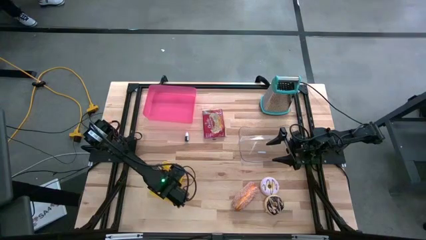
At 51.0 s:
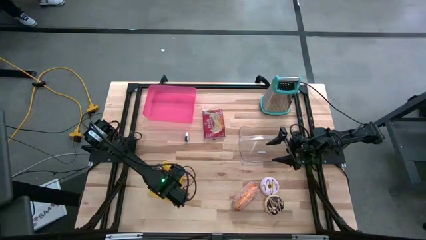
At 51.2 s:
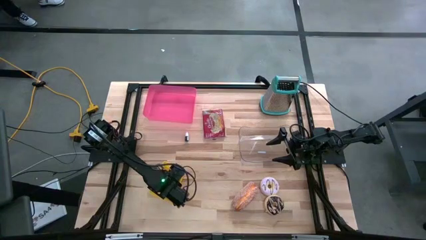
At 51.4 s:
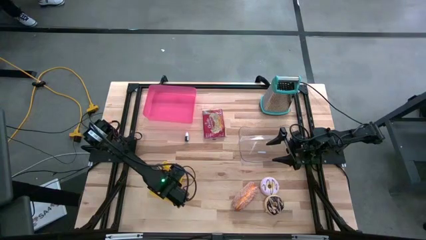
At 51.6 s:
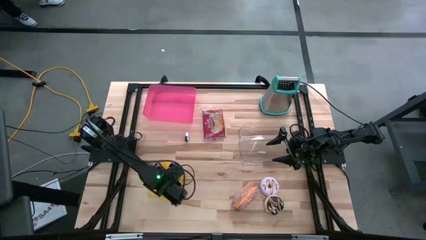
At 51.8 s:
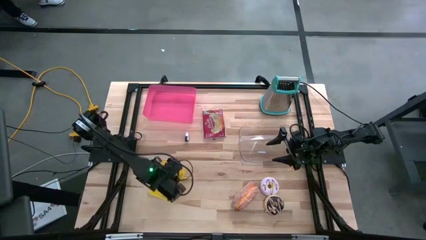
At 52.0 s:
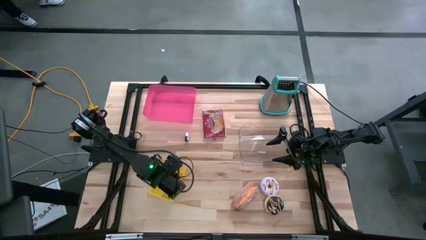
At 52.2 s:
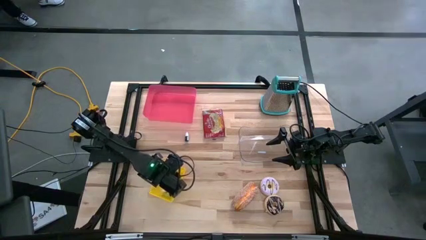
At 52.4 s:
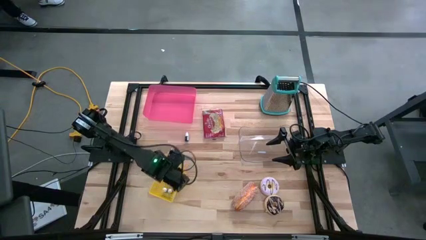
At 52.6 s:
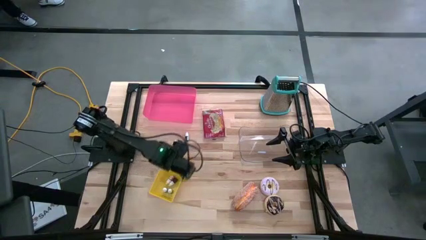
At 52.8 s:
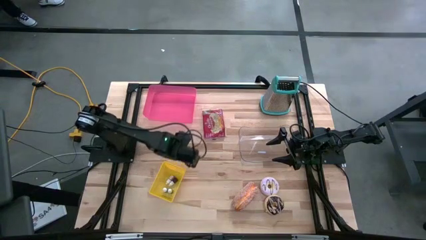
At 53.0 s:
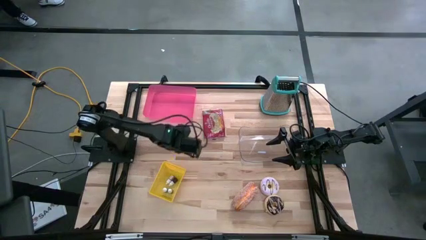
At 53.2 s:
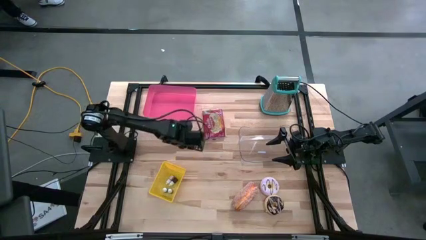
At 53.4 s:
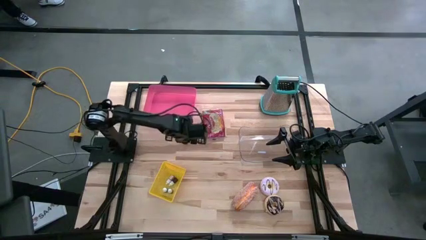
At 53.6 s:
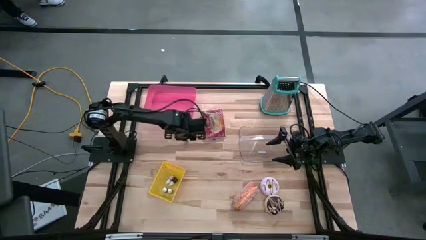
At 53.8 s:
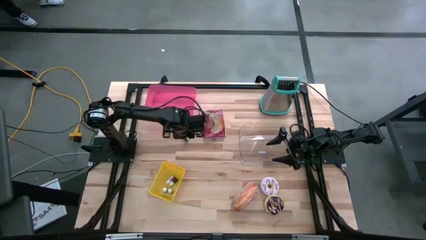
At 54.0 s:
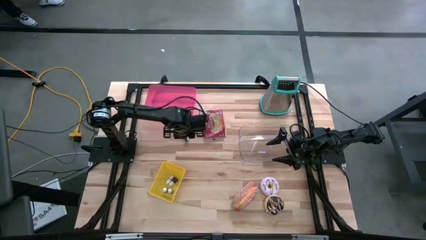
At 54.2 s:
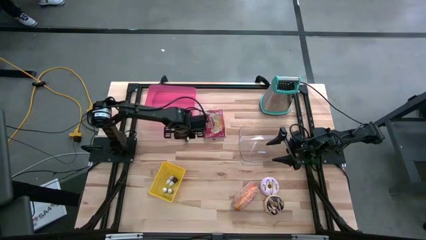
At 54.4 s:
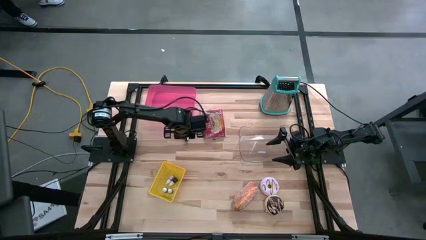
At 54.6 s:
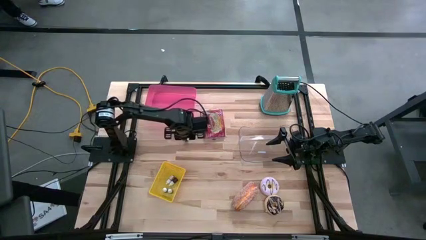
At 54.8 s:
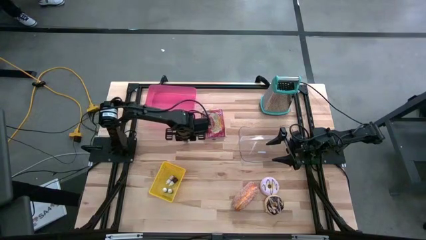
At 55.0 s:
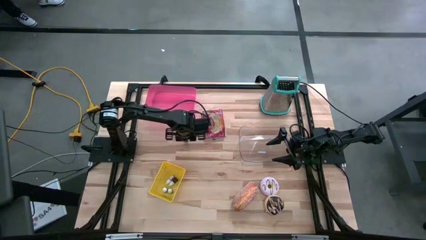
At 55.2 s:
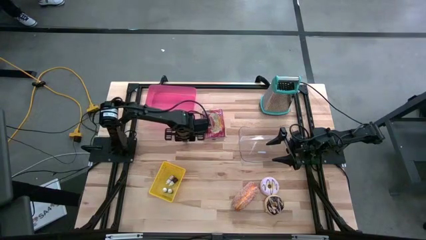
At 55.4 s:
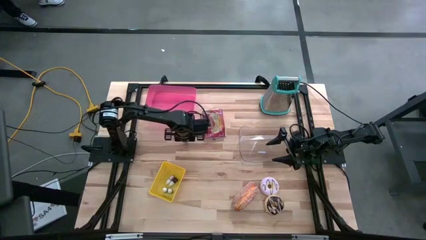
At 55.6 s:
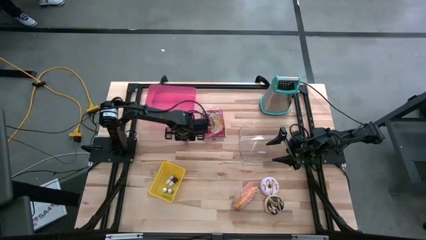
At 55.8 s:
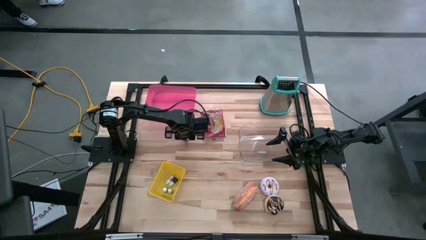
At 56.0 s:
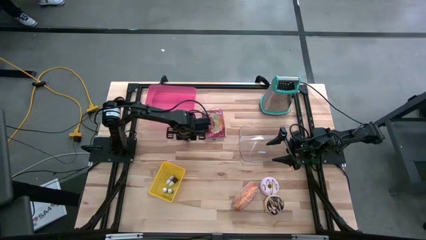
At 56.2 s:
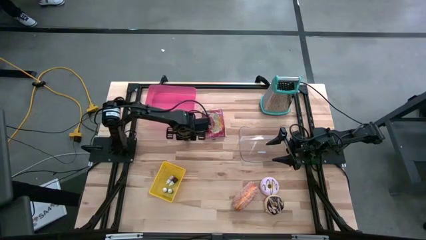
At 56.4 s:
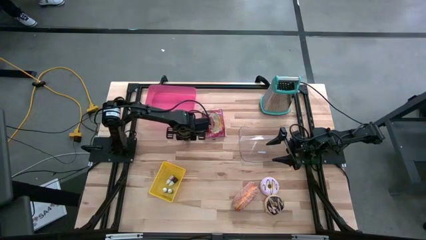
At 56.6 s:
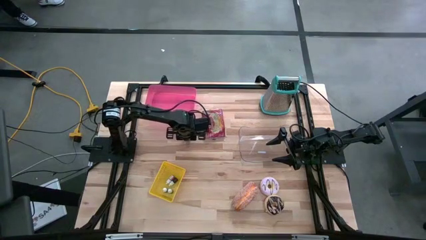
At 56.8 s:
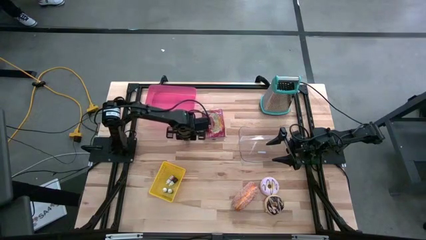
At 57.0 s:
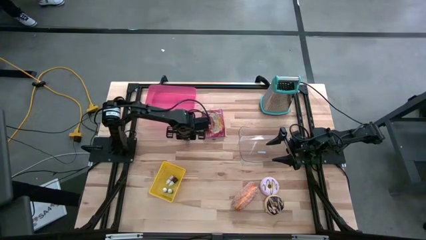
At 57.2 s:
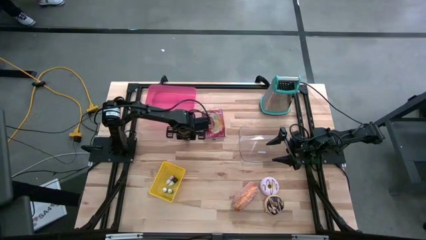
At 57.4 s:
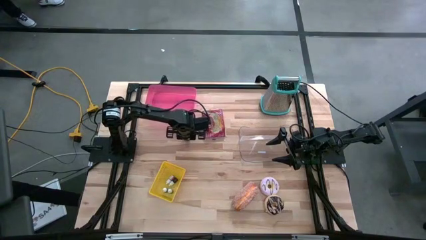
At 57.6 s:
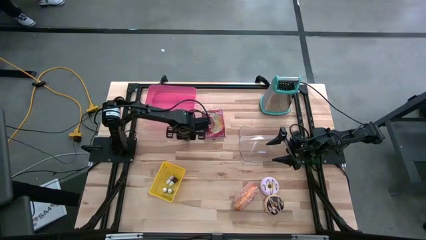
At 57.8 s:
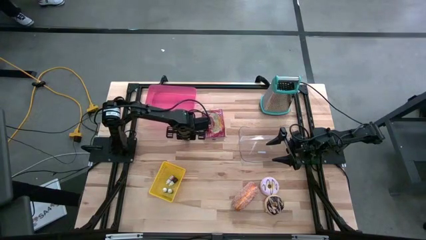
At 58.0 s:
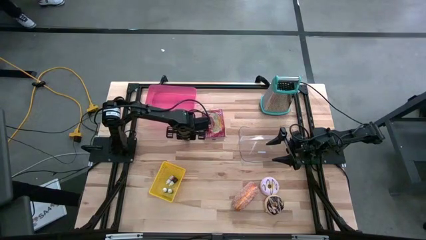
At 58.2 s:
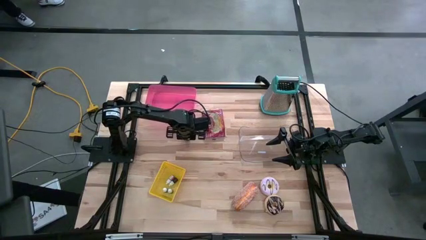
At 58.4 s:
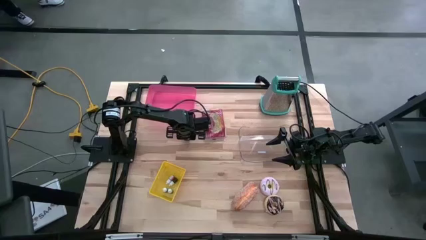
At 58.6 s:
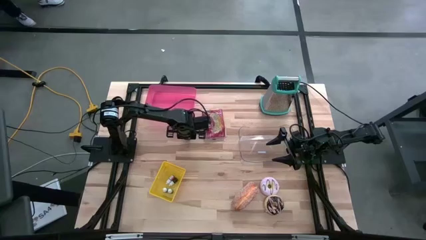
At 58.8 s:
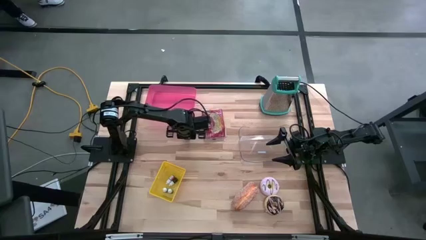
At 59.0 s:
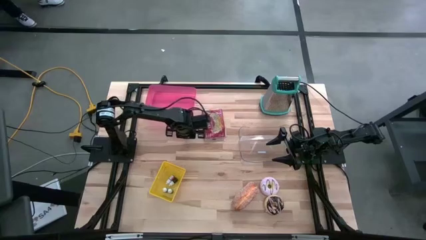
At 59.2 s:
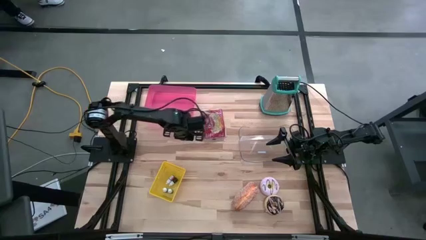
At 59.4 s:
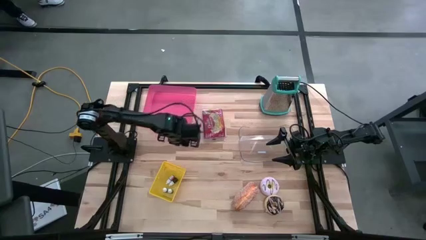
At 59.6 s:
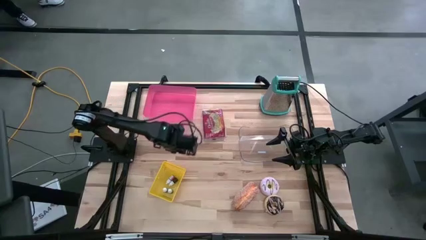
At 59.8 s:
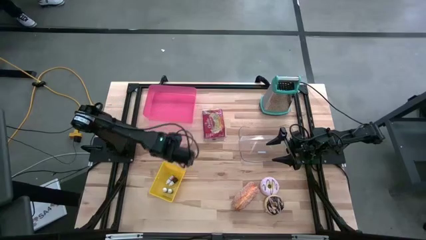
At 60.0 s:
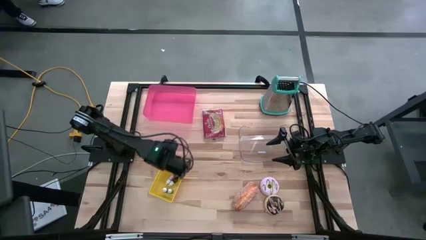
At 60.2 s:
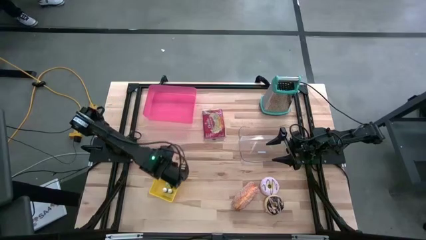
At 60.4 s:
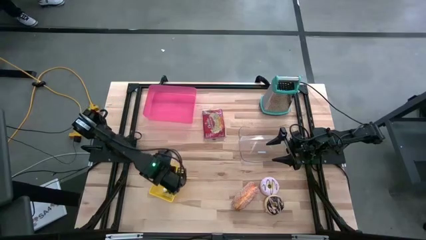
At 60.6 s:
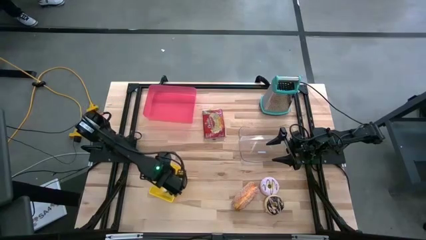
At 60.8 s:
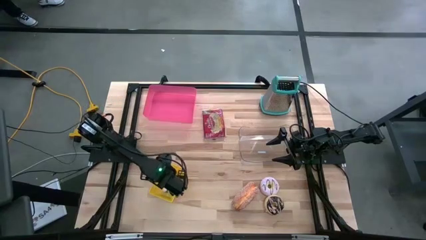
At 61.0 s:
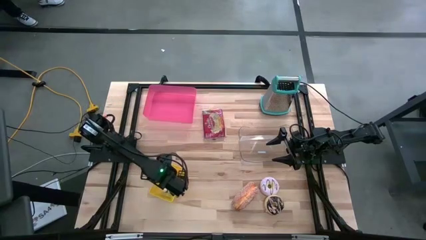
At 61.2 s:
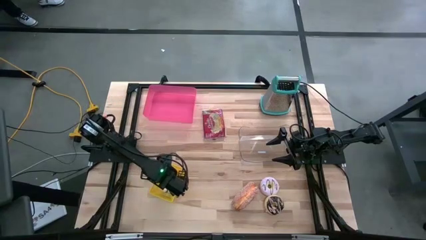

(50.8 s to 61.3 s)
Put the black food coloring bottle into the yellow bin
